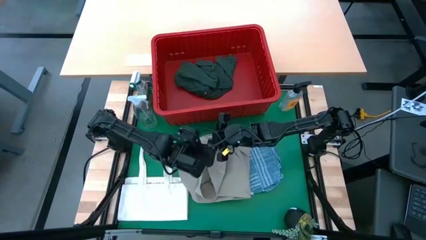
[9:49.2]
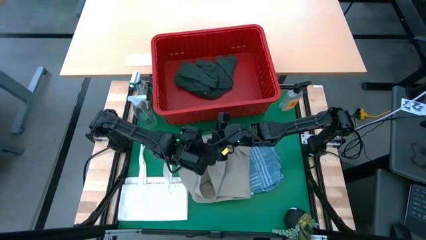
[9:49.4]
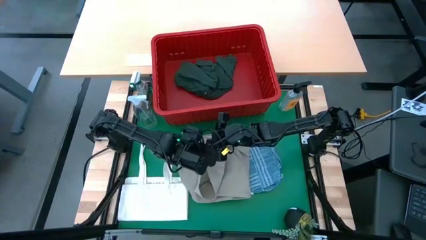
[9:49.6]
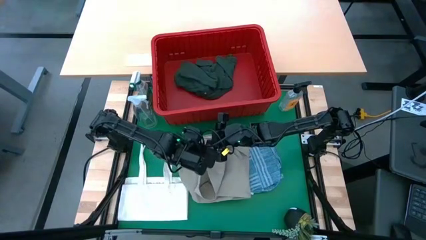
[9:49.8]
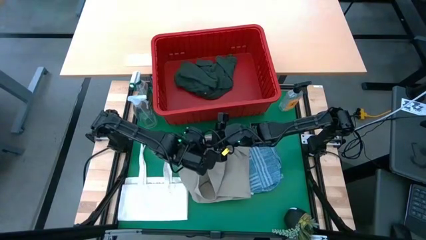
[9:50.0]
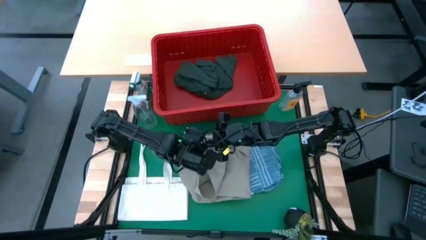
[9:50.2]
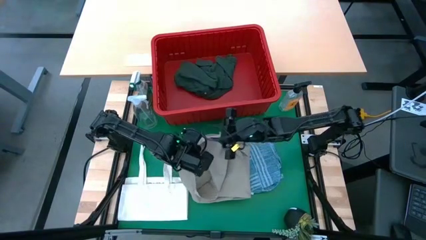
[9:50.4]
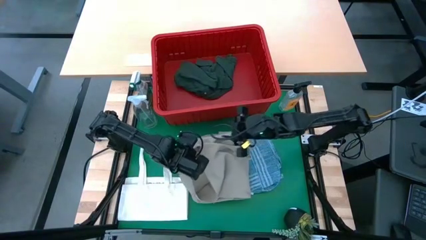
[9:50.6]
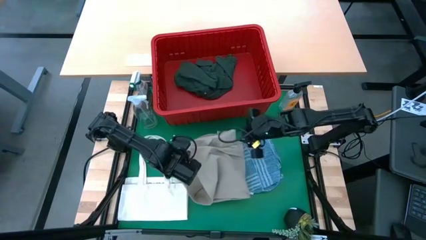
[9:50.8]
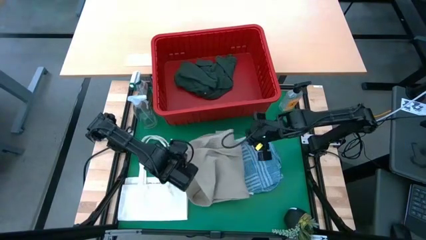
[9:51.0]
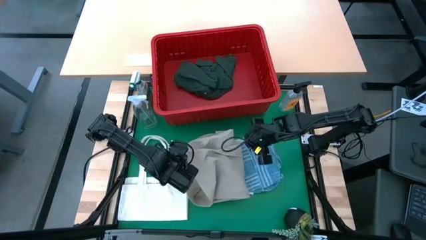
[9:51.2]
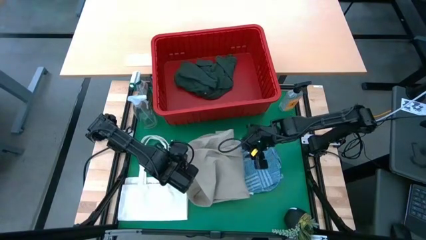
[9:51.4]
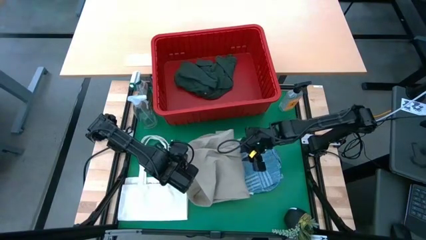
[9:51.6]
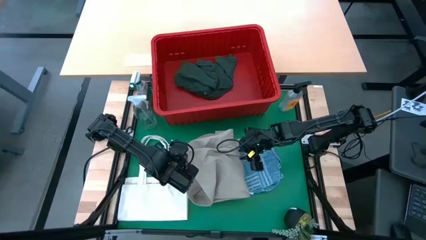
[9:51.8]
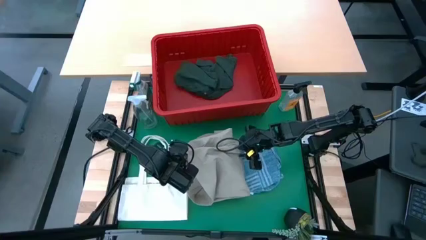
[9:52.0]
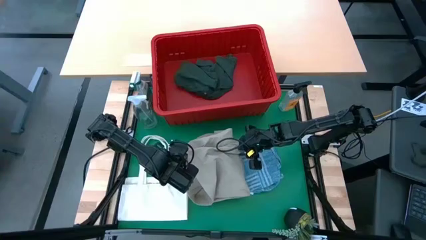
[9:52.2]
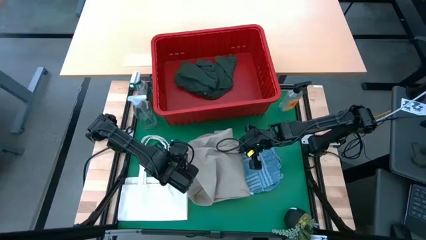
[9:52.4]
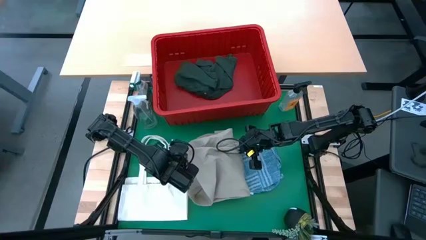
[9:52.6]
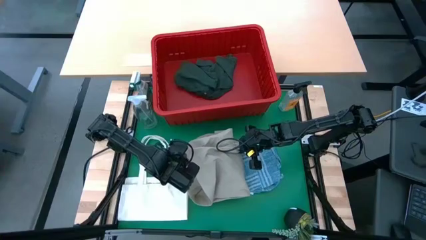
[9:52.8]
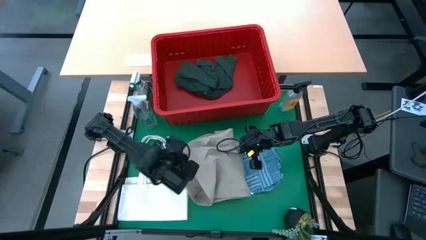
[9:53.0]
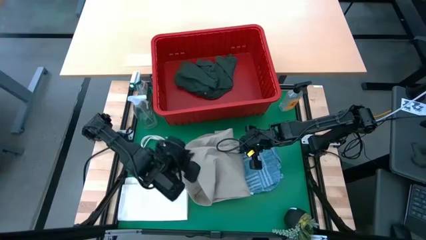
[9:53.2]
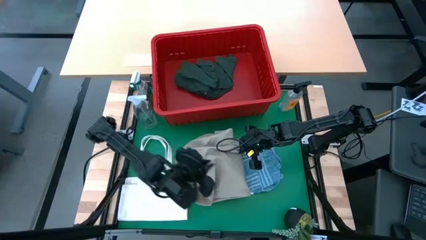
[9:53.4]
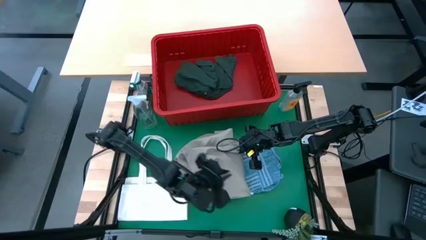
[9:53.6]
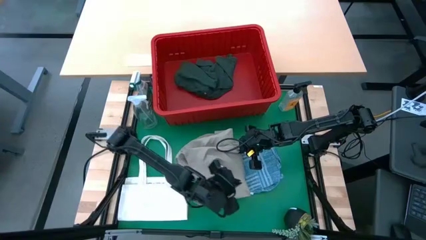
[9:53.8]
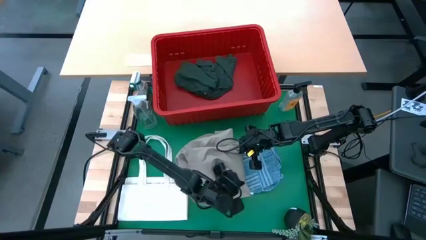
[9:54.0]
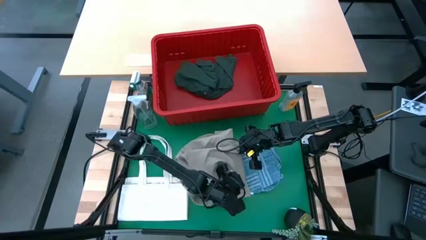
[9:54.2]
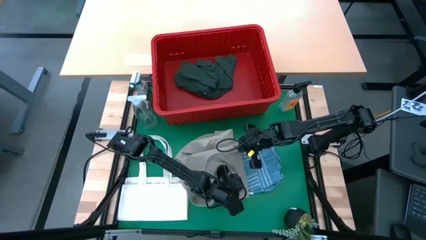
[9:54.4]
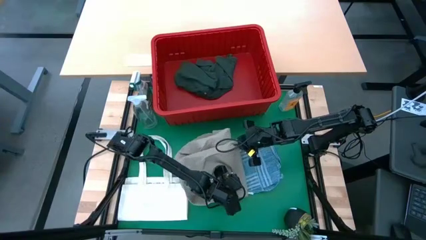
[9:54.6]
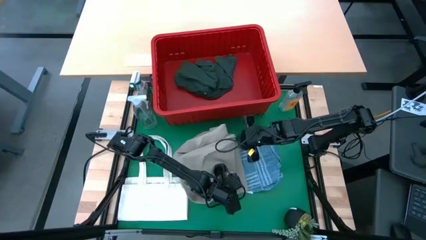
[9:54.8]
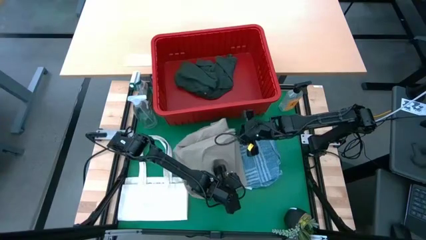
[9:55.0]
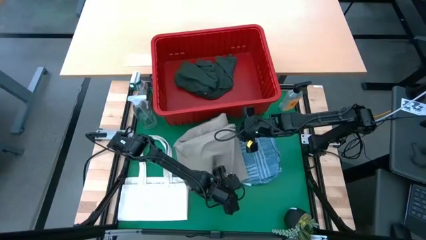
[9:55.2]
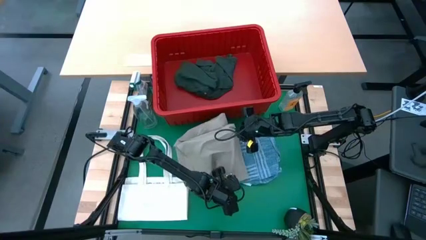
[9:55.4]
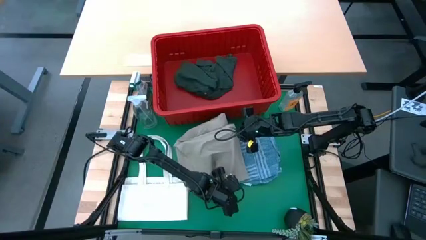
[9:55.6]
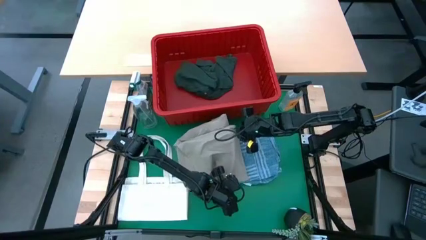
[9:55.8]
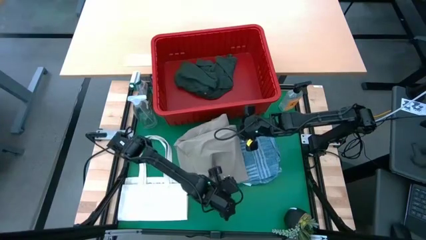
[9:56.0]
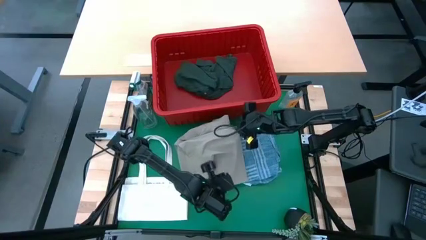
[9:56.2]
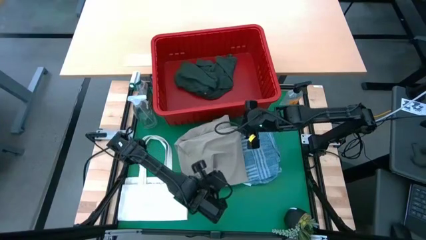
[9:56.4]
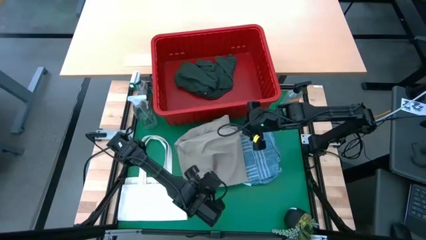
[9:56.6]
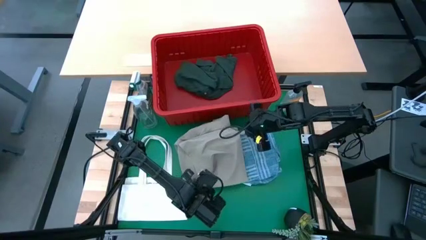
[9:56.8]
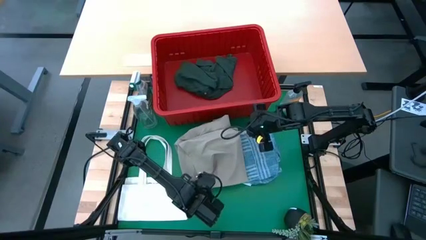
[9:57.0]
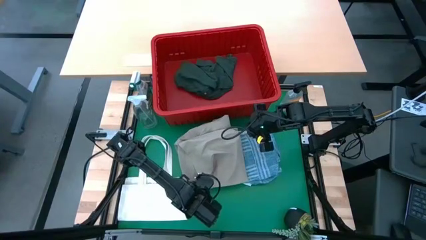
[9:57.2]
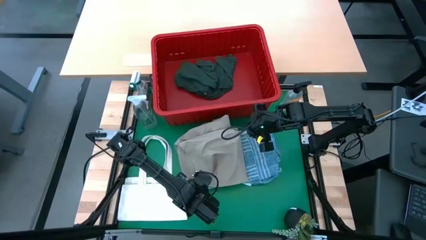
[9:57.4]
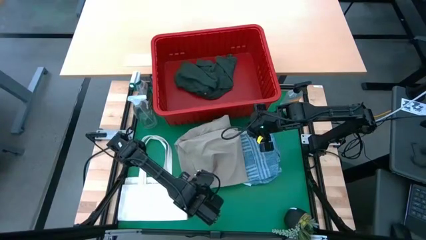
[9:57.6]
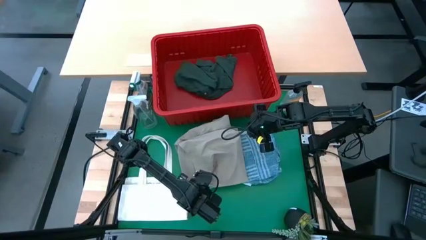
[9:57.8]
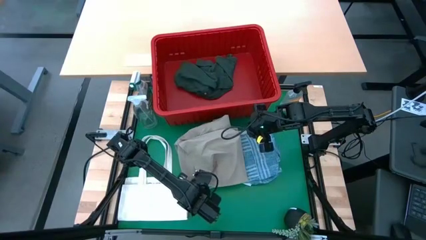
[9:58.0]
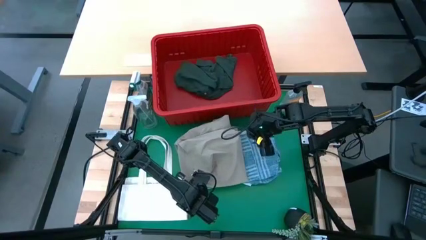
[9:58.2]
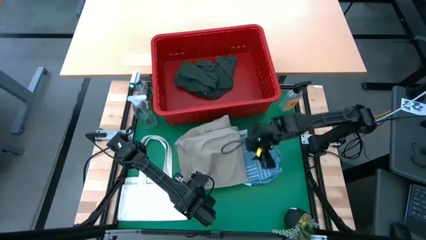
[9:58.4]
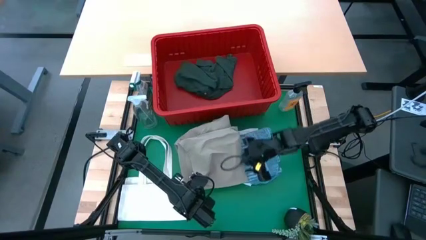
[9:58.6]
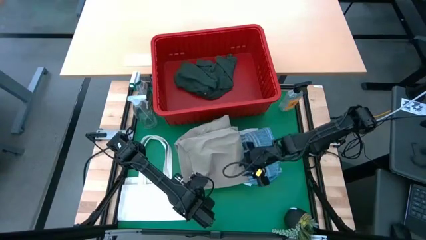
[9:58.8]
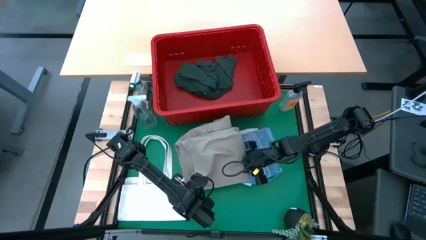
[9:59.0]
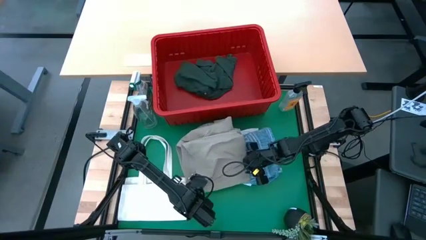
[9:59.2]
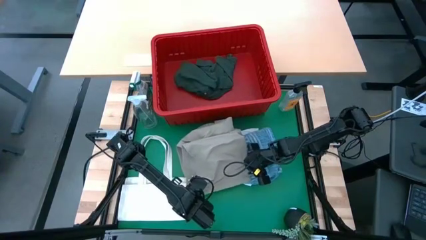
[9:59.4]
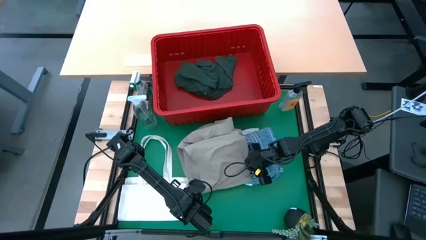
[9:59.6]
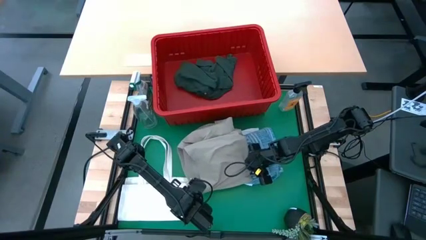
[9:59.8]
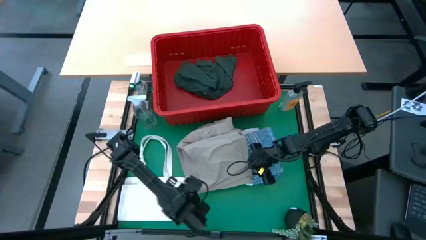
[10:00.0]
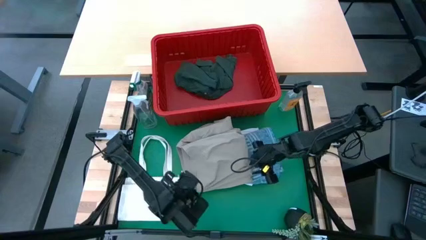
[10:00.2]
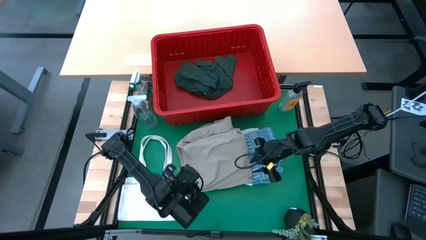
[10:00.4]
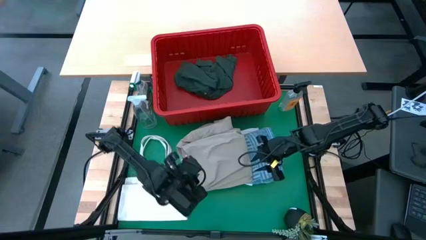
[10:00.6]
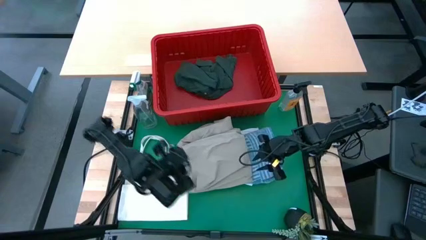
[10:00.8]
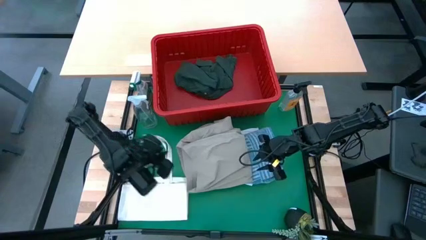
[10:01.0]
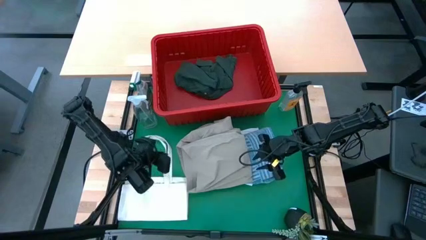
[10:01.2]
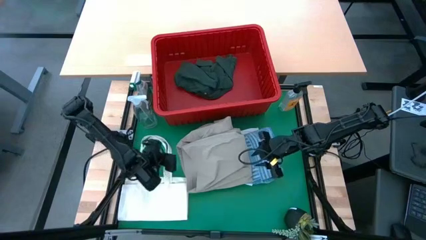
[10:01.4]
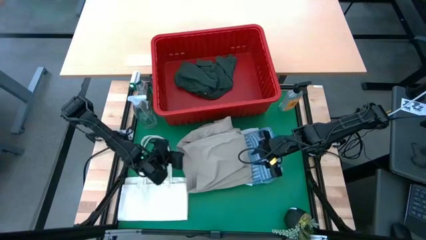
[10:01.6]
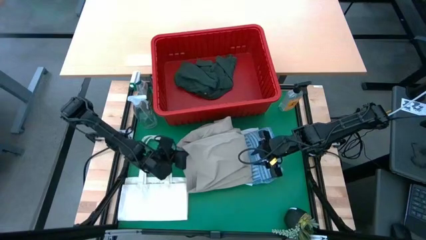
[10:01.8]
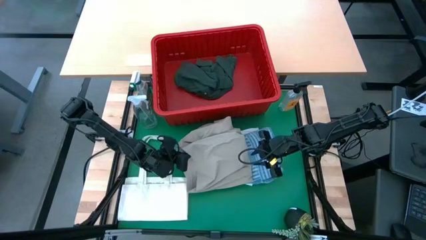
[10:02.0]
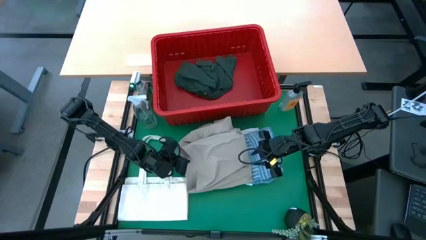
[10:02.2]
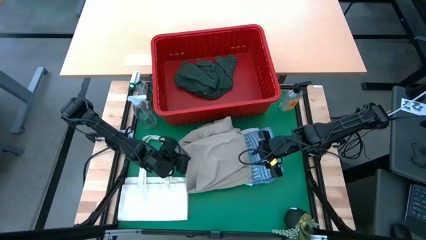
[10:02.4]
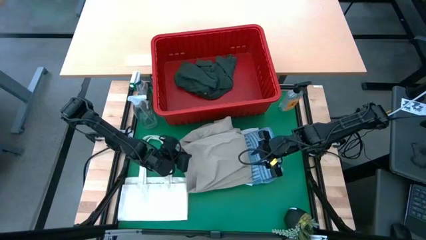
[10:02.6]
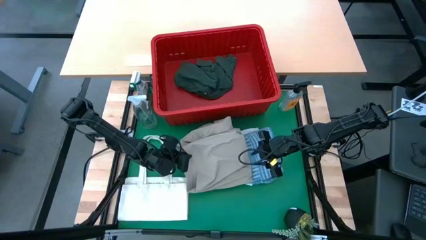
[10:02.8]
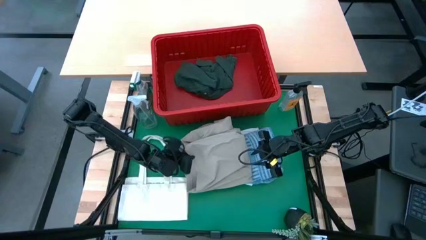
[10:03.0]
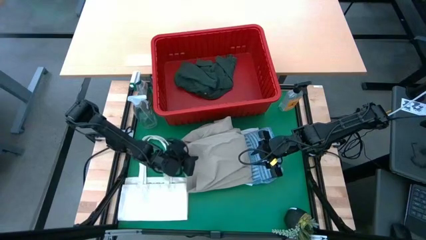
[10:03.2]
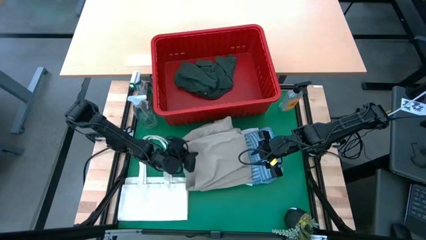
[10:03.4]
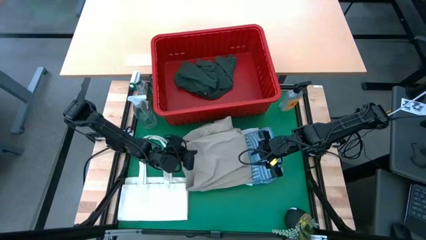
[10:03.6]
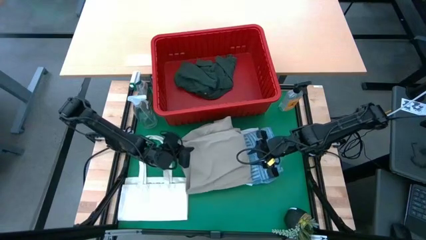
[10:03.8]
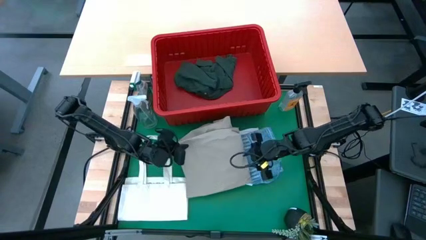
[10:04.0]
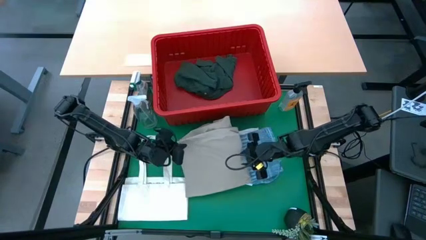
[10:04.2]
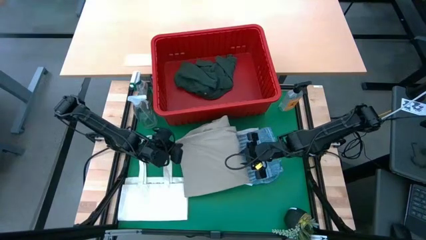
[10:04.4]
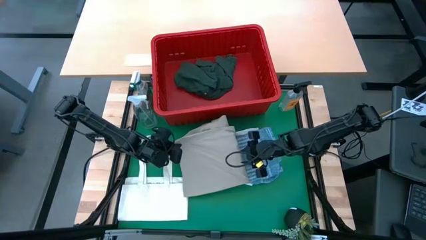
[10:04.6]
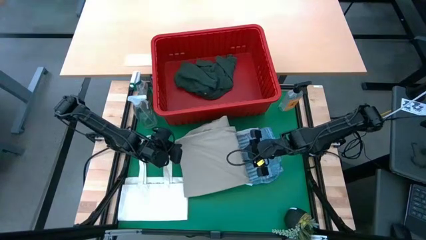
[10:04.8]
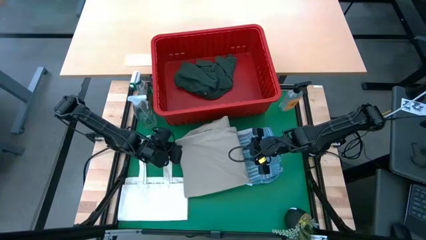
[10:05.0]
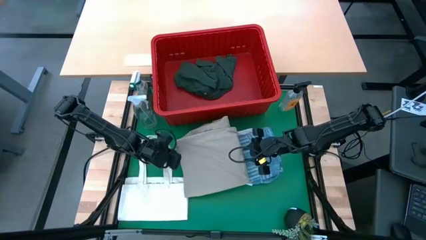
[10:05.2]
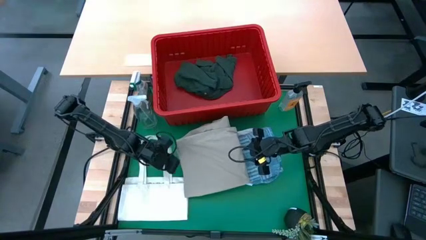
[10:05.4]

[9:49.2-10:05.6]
Task: Fold Laundry from Bin
Fold the light brown shorts
